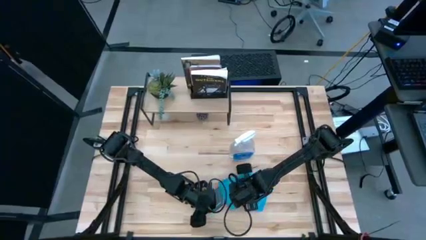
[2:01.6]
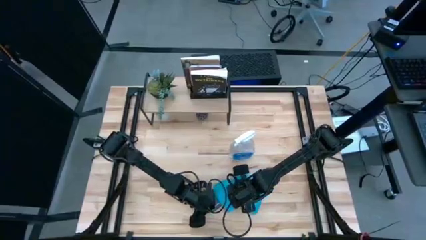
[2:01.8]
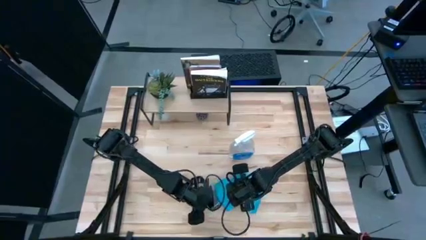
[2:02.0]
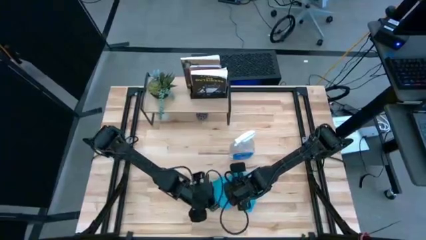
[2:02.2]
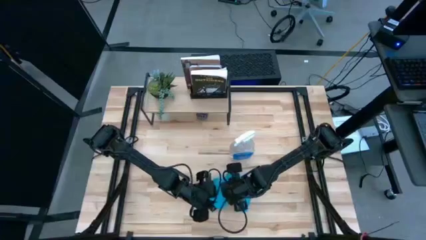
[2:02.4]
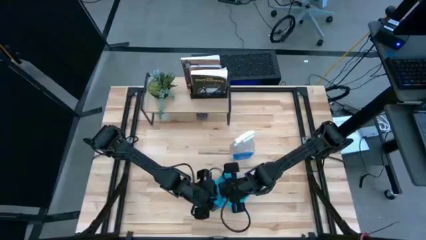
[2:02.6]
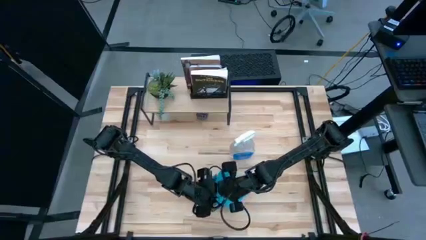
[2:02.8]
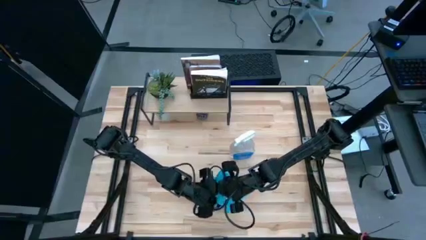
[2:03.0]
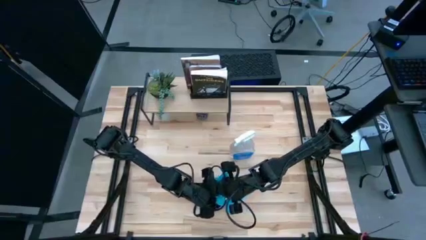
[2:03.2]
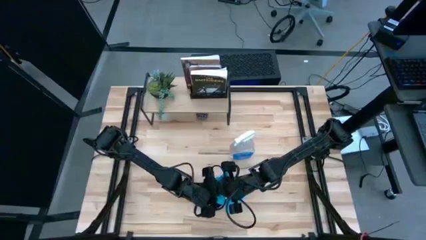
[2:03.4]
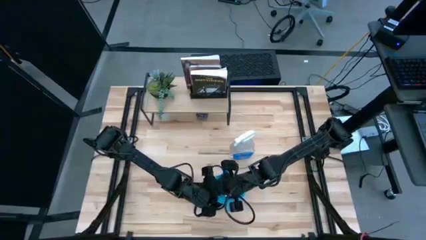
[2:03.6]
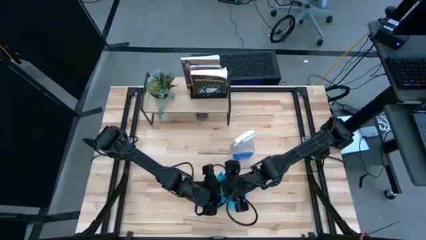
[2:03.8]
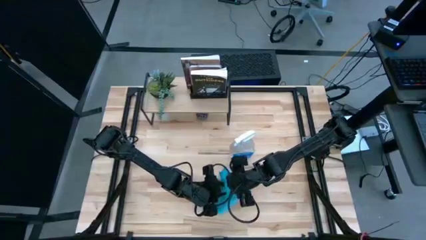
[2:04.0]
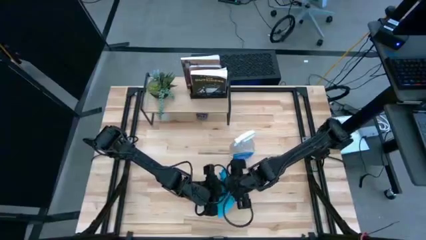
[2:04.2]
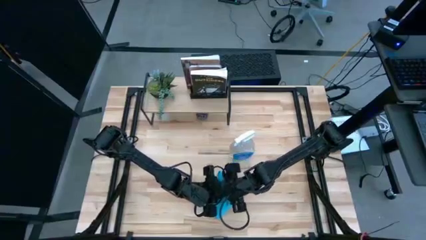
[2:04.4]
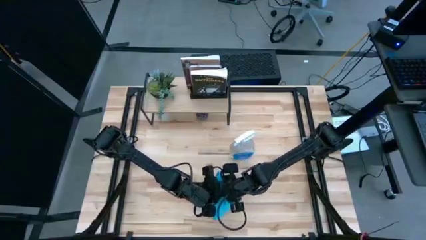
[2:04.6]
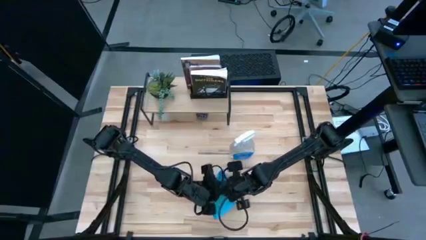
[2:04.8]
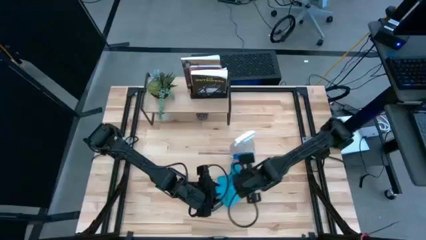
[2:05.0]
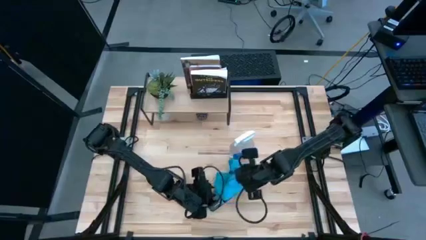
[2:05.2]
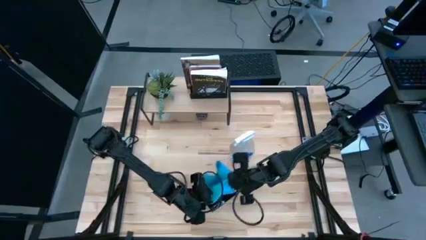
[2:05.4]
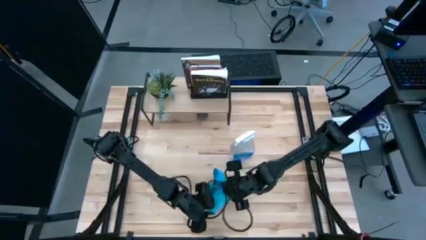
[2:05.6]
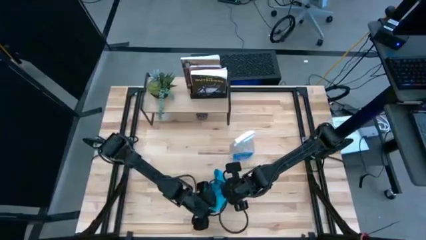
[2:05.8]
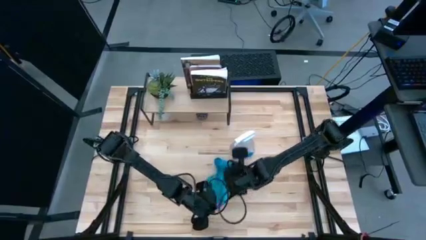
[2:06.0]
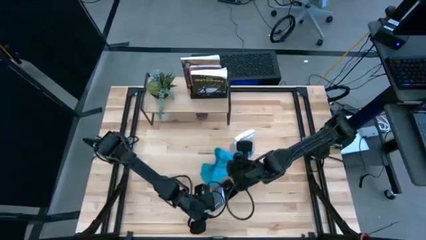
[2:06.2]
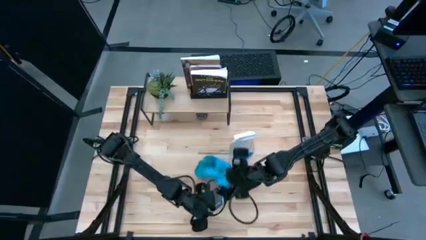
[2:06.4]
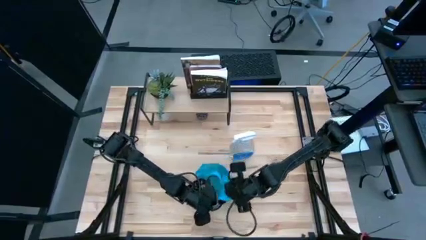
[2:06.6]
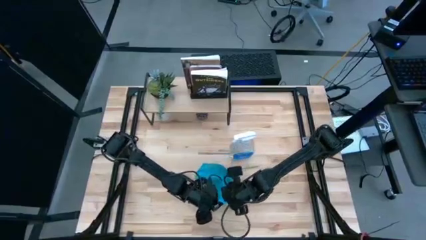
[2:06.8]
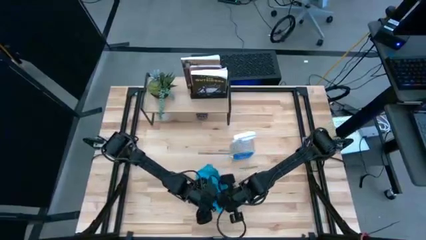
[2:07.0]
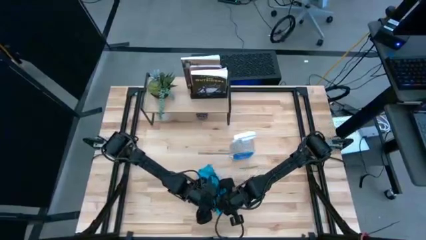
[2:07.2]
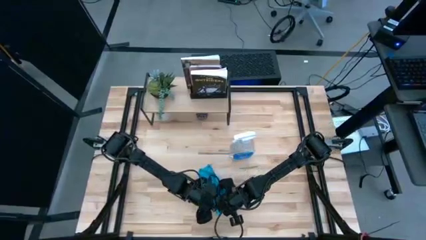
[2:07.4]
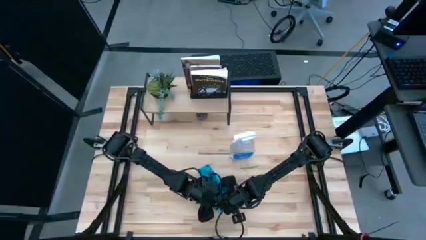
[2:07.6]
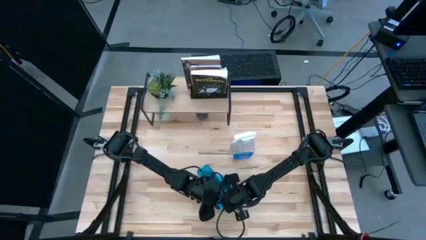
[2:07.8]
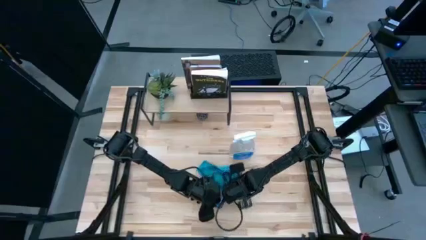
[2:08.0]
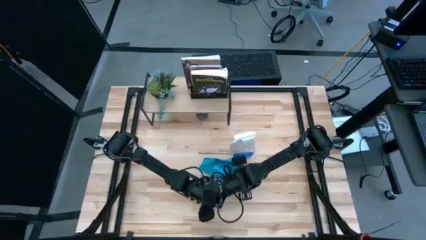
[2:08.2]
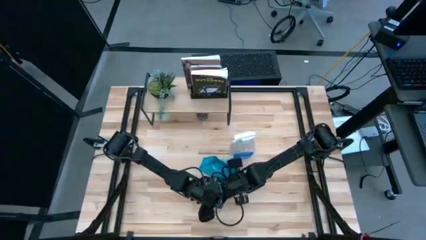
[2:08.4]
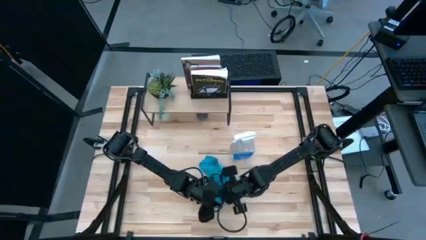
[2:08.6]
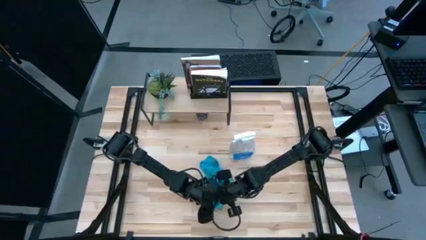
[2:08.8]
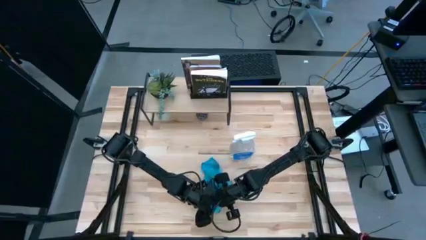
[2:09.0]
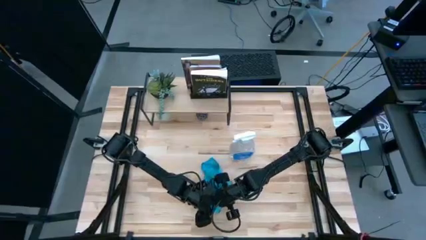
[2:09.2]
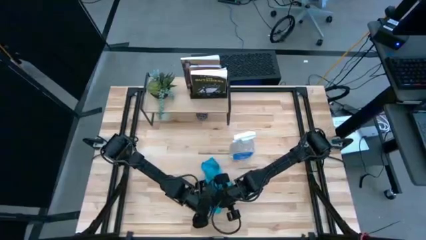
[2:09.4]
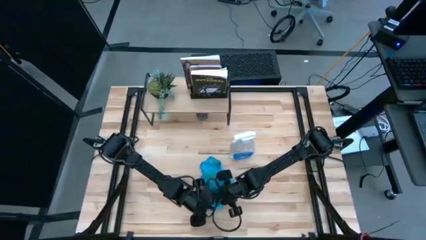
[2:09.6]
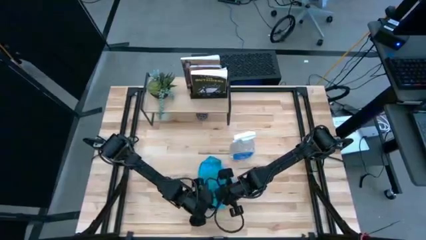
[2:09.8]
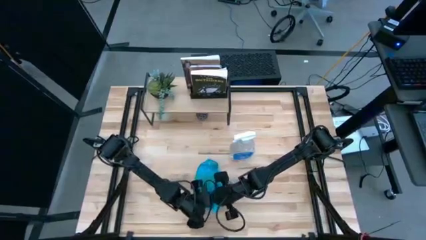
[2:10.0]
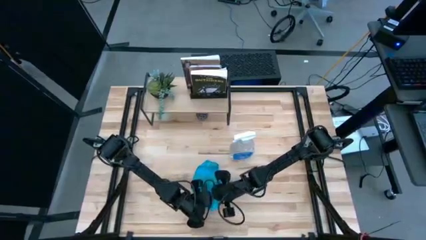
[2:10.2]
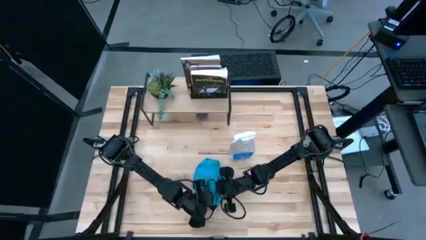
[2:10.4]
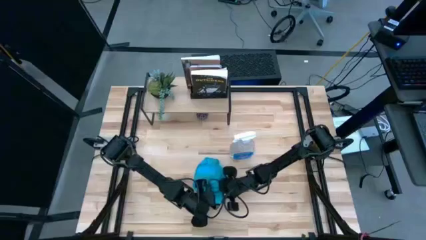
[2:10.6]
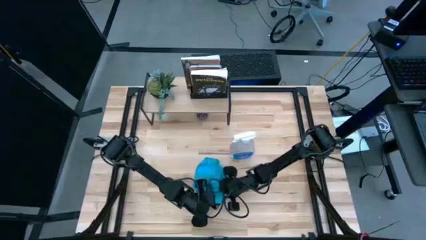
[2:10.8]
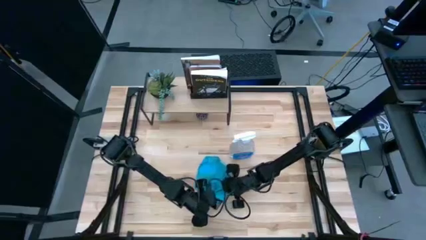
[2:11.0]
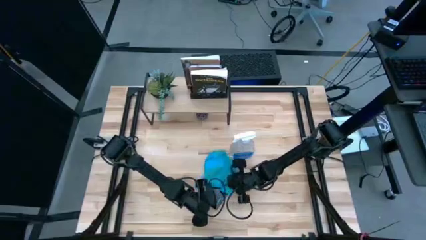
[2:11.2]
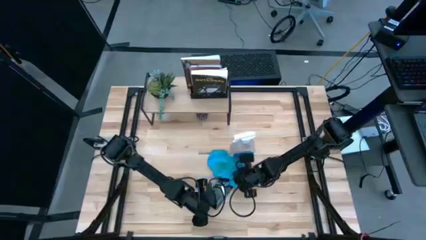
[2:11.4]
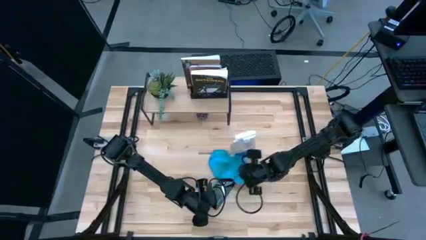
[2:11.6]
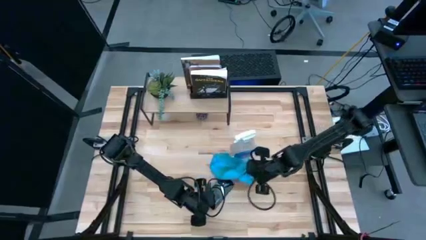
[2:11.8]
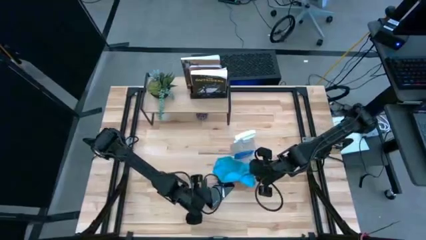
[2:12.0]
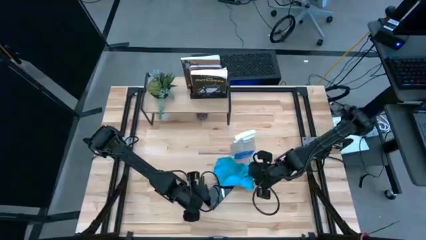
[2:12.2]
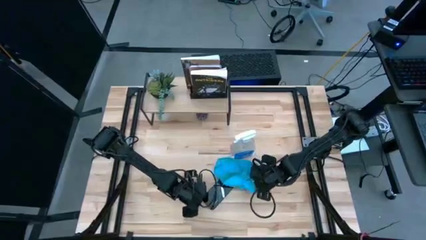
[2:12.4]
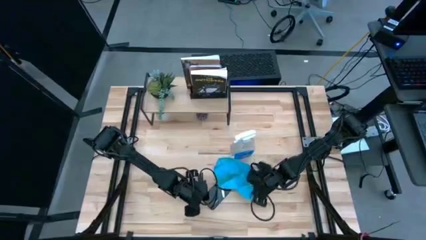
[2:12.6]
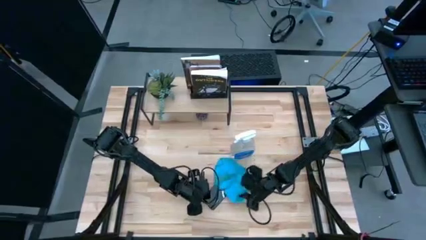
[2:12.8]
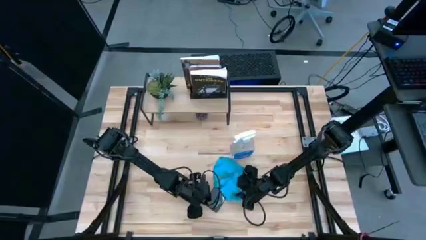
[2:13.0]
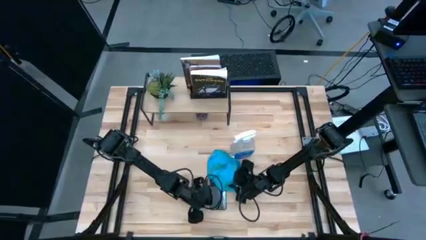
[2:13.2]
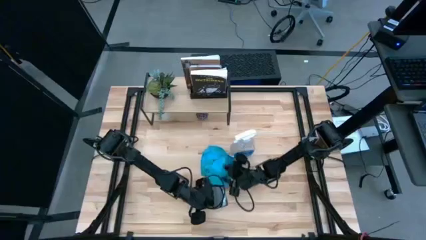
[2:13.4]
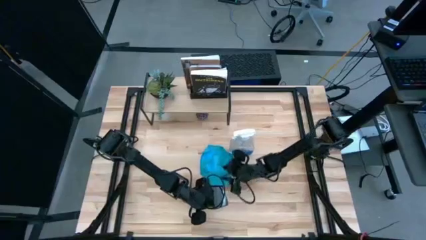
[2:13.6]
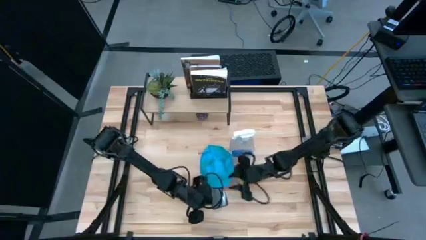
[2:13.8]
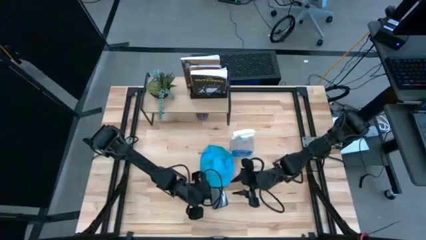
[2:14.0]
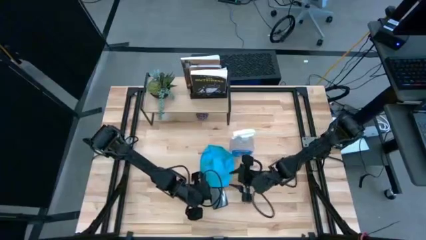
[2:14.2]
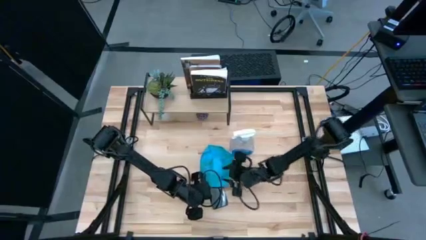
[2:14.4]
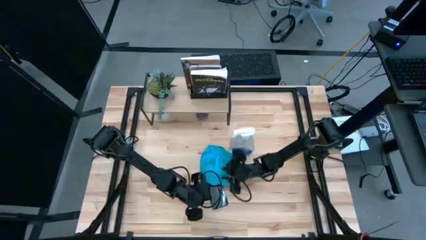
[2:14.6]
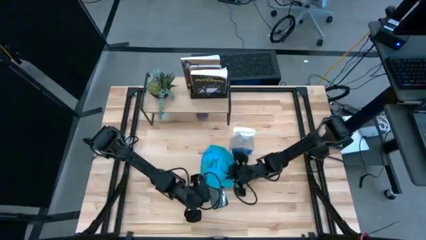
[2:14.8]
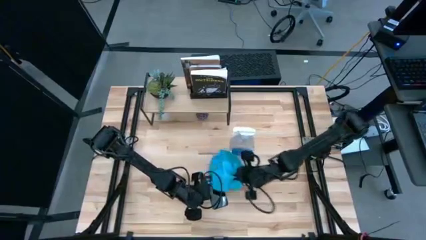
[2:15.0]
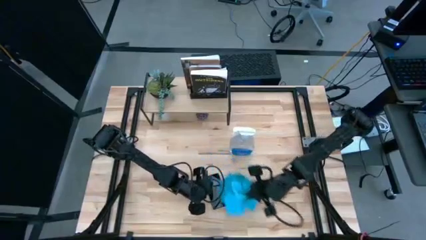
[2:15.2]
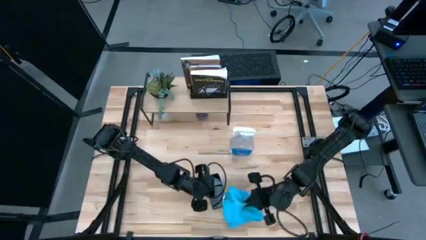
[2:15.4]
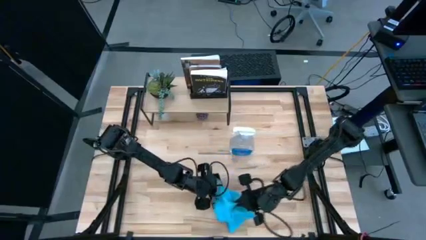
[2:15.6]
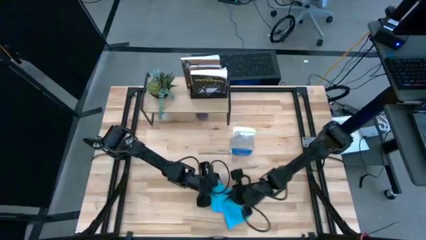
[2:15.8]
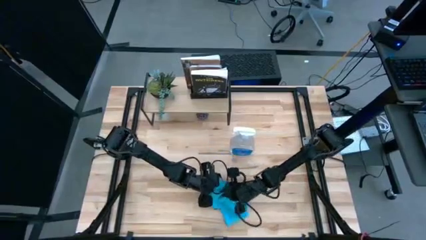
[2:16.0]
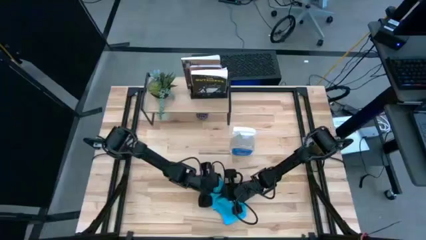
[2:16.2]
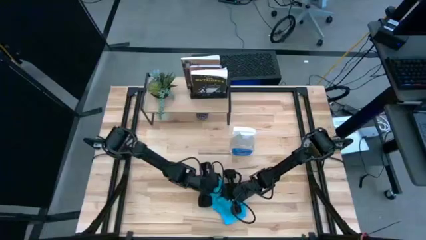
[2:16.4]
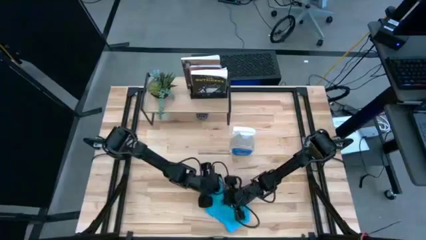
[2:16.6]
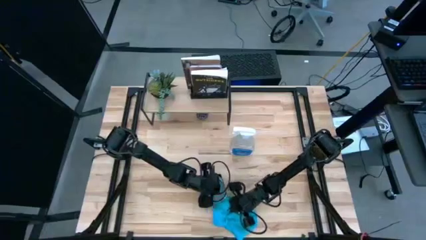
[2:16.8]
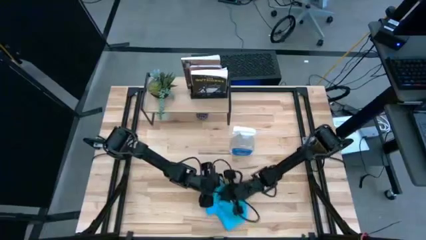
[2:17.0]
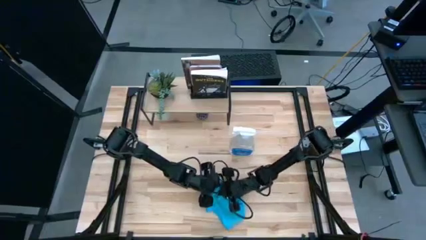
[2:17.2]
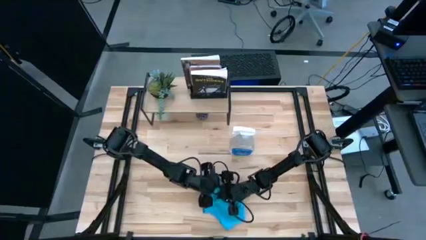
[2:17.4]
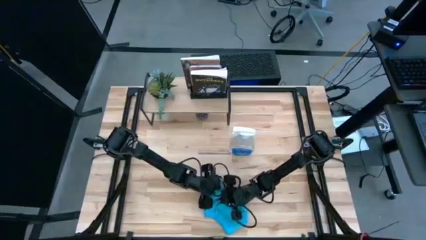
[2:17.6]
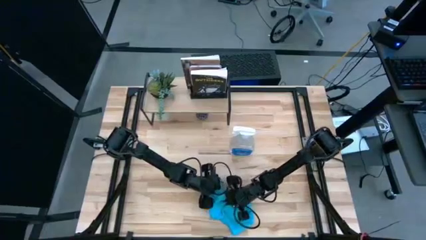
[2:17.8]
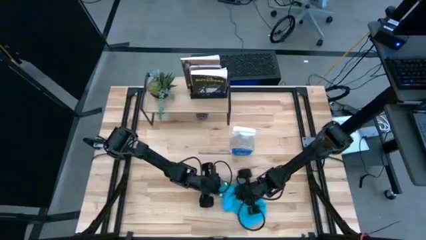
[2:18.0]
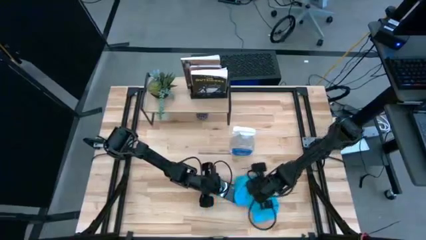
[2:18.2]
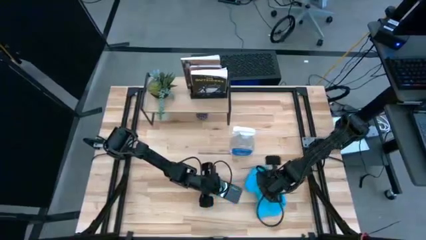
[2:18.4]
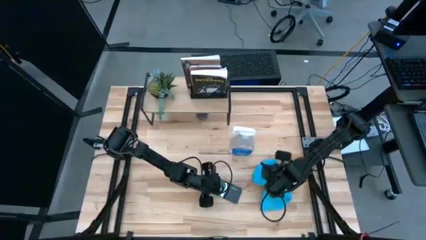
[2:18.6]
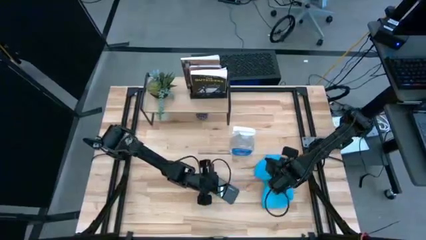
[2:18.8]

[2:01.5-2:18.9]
Task: Apply microfiber cloth
Wipe the back of the black cellphone with a blue microfiber cloth
